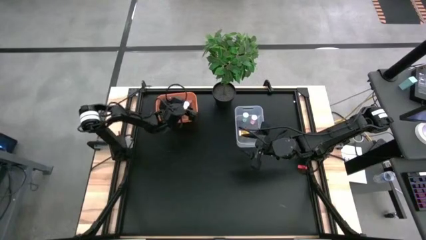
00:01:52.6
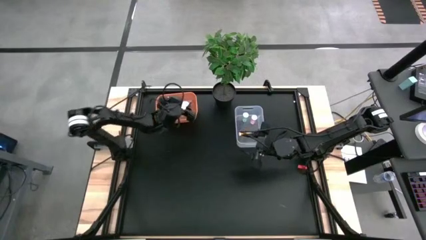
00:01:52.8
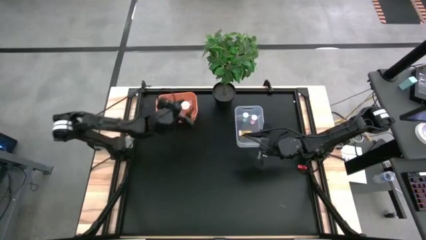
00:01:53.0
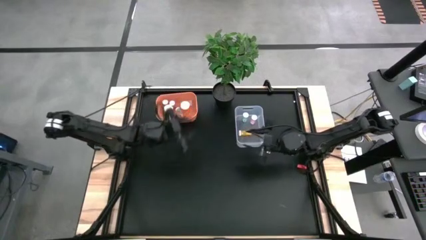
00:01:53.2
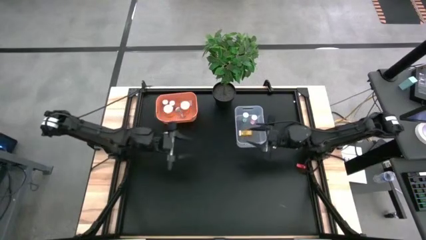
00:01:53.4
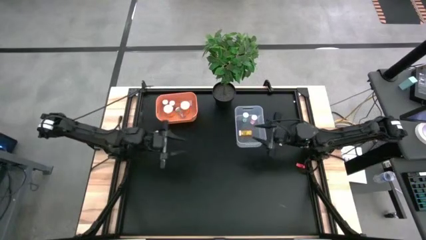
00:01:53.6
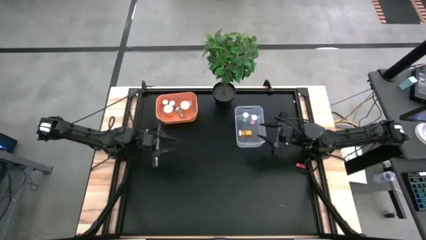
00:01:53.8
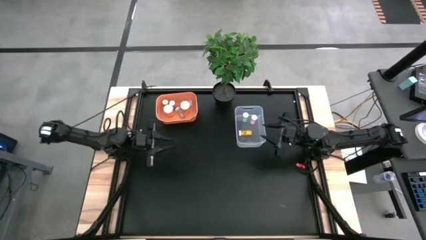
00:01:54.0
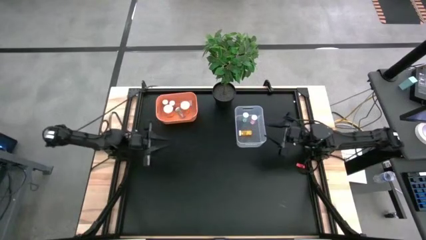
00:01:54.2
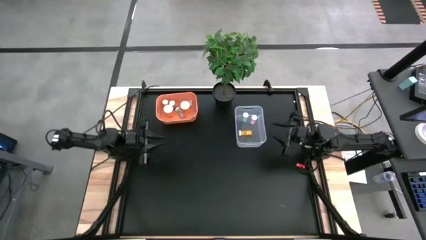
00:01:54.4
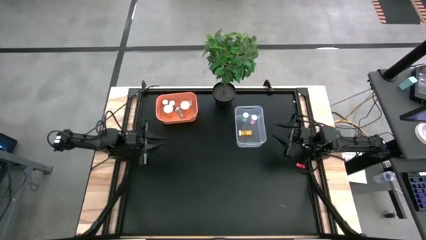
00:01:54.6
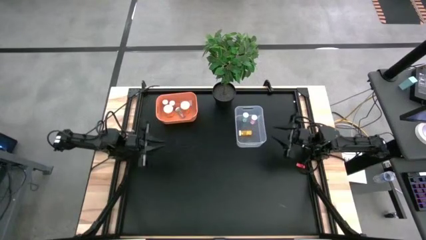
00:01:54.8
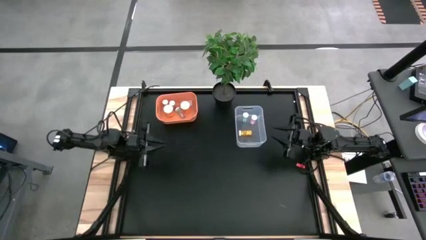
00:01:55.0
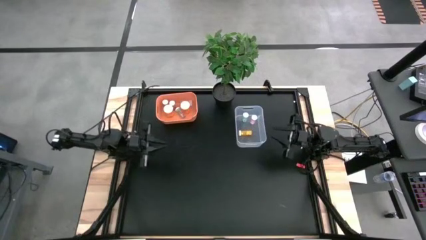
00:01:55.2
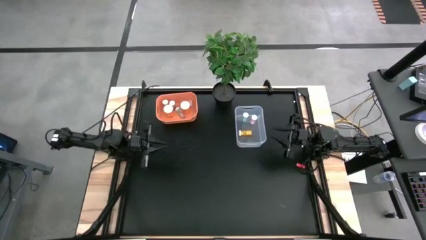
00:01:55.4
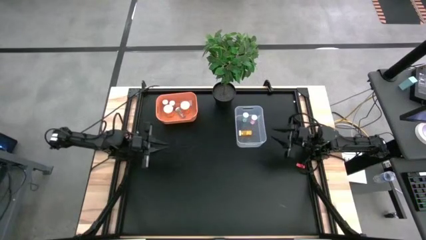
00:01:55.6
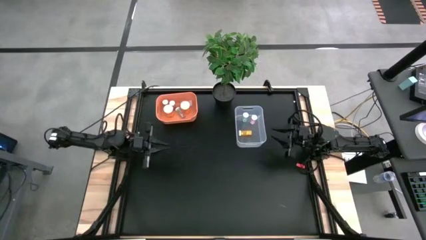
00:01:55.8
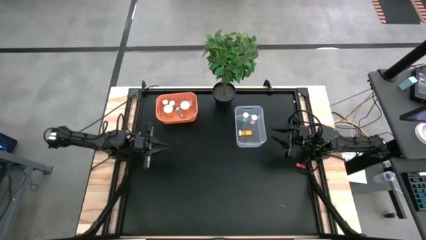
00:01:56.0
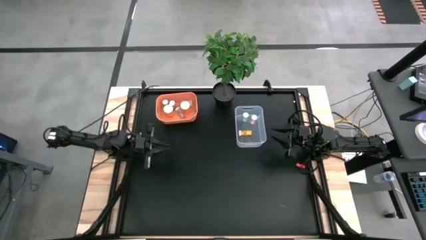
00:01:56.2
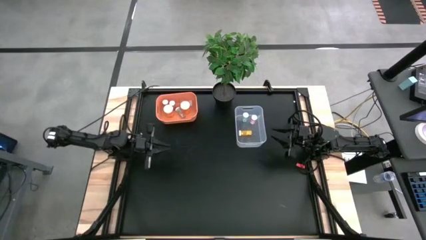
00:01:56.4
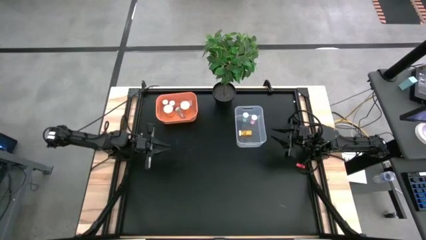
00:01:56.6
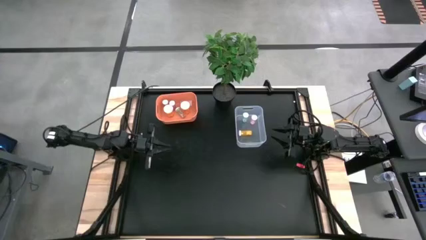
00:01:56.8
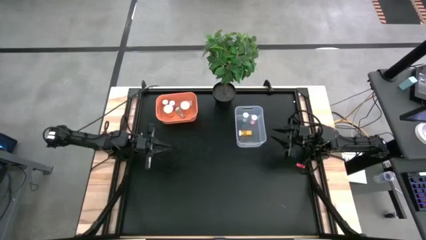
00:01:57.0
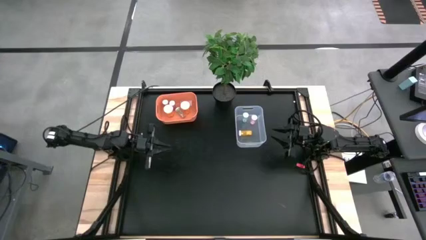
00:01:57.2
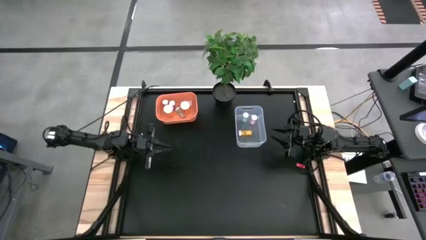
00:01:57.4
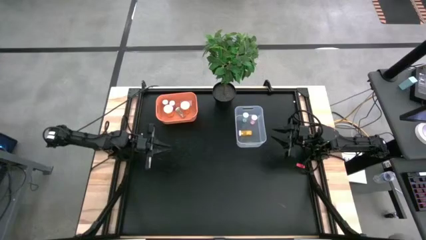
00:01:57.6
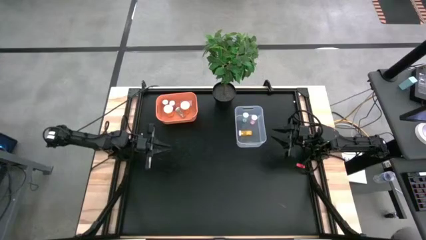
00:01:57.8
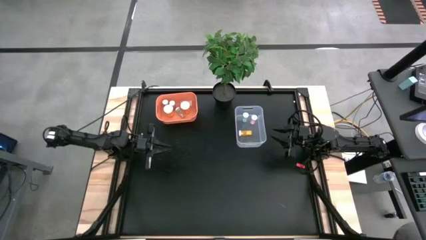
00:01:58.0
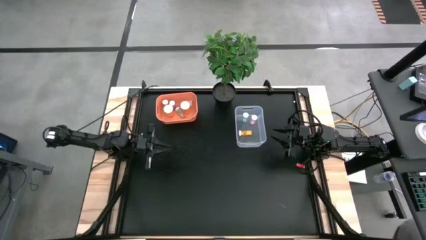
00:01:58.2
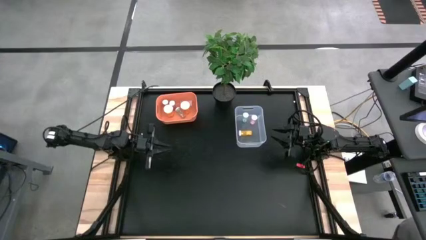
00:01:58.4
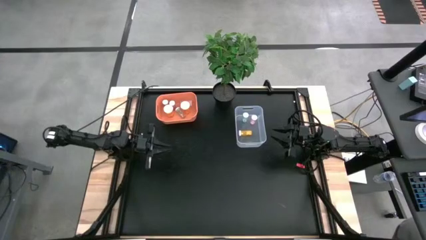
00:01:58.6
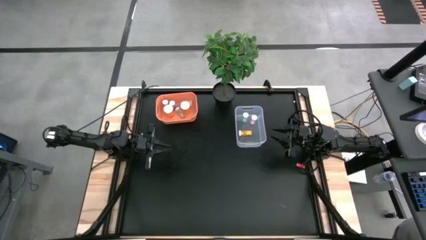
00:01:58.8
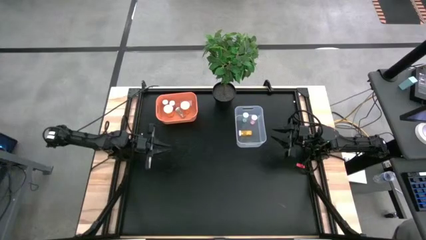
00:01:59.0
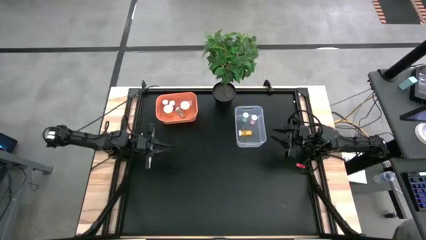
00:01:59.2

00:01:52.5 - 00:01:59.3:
Task: Pick and place medicine bottles into bin by pill shape (circle, oval)
Return to Home Position

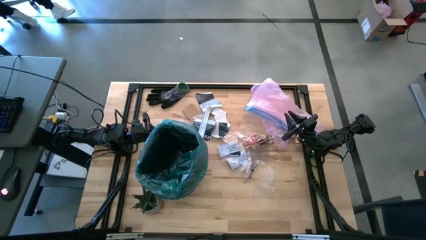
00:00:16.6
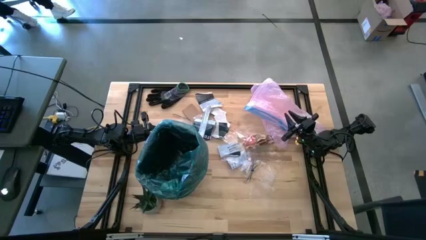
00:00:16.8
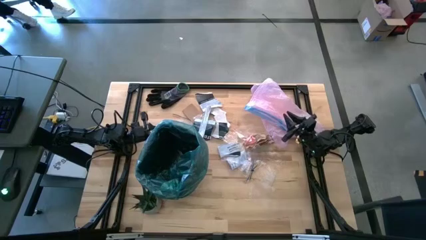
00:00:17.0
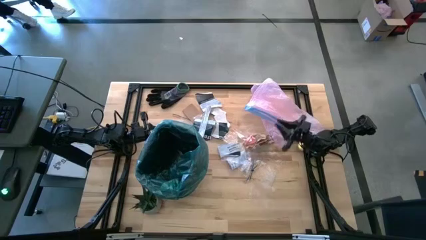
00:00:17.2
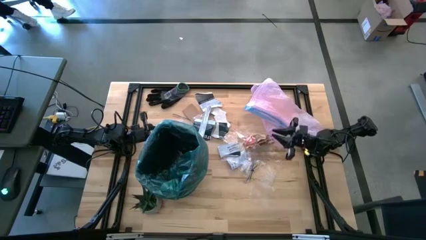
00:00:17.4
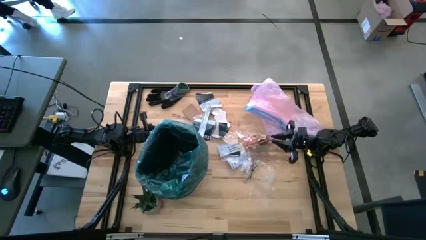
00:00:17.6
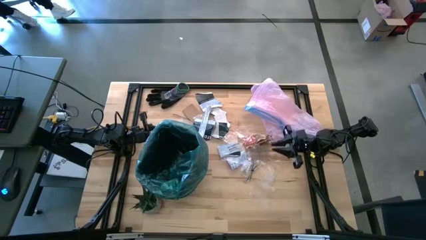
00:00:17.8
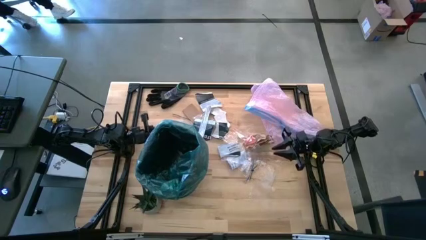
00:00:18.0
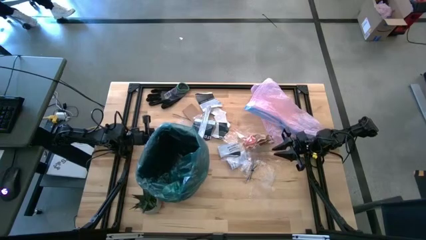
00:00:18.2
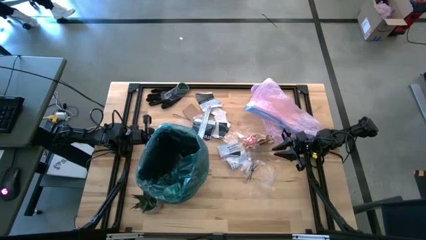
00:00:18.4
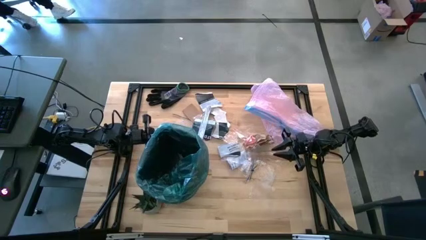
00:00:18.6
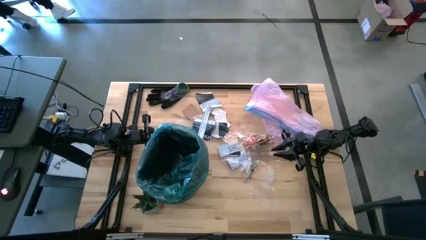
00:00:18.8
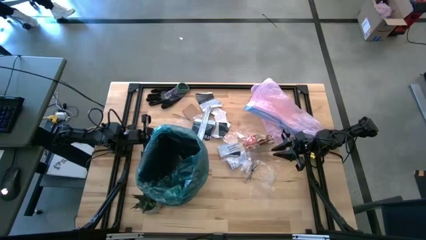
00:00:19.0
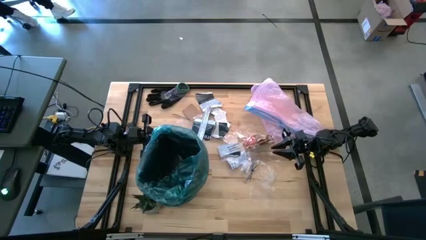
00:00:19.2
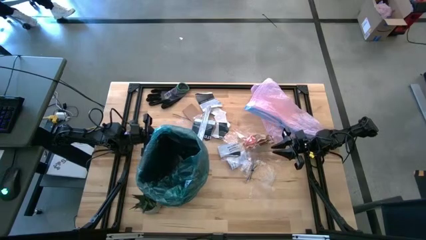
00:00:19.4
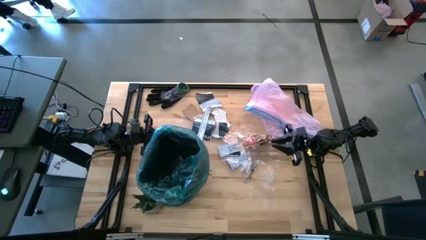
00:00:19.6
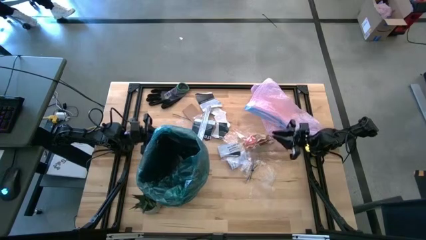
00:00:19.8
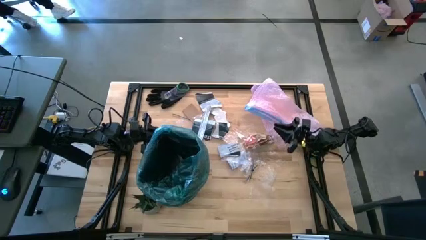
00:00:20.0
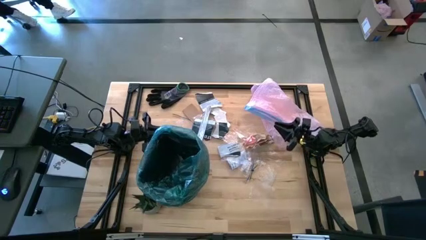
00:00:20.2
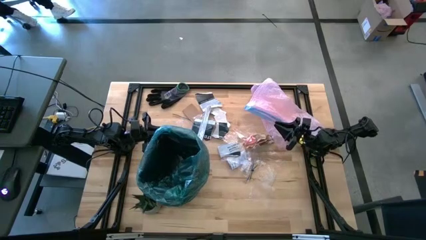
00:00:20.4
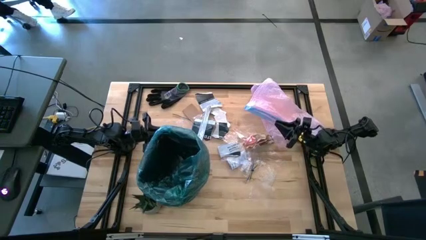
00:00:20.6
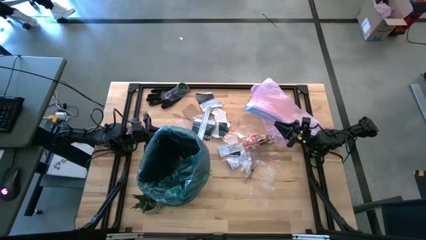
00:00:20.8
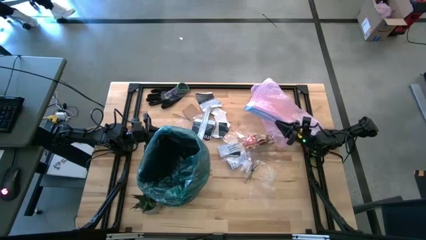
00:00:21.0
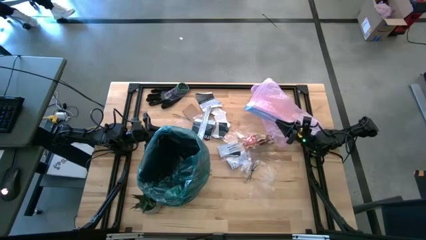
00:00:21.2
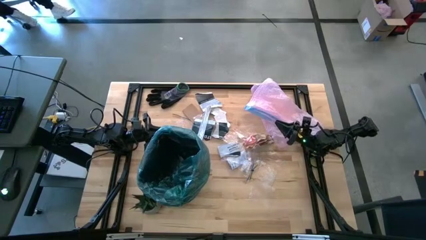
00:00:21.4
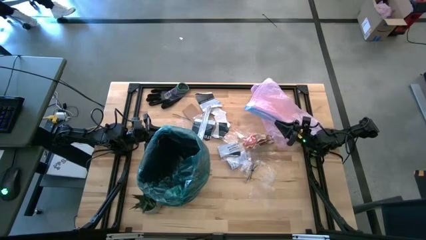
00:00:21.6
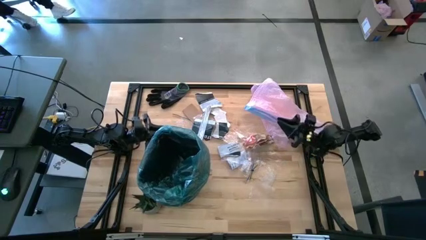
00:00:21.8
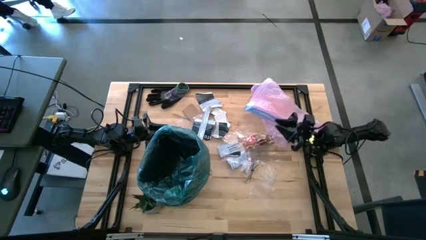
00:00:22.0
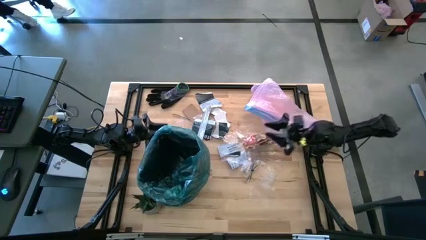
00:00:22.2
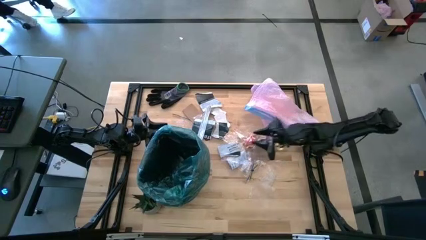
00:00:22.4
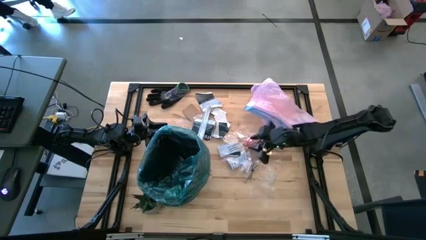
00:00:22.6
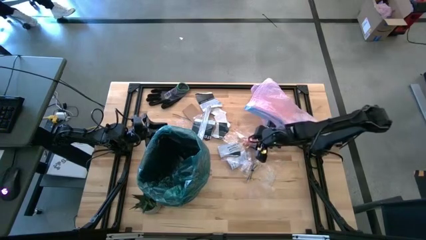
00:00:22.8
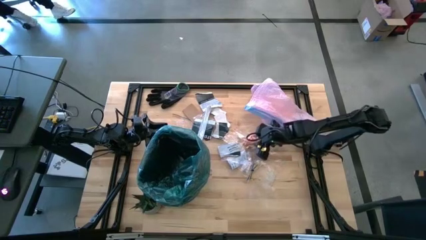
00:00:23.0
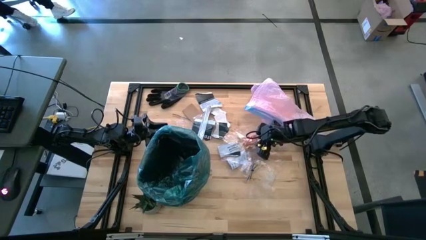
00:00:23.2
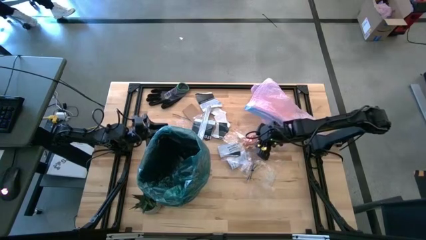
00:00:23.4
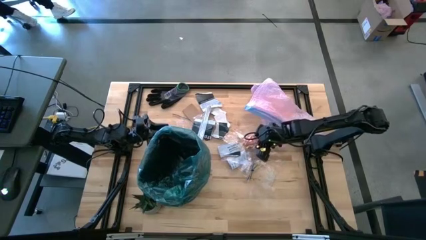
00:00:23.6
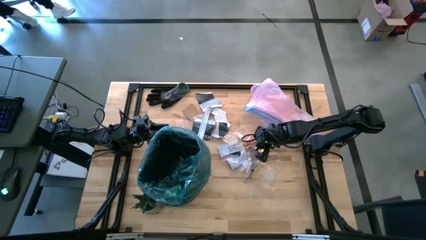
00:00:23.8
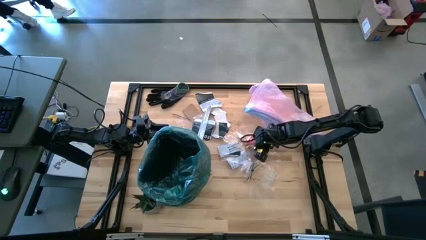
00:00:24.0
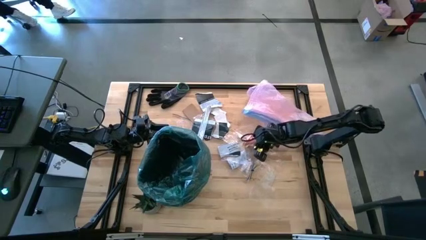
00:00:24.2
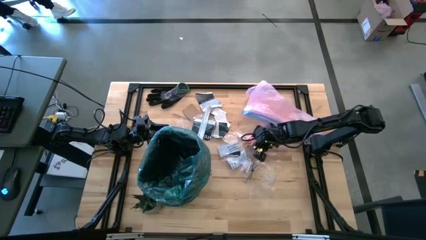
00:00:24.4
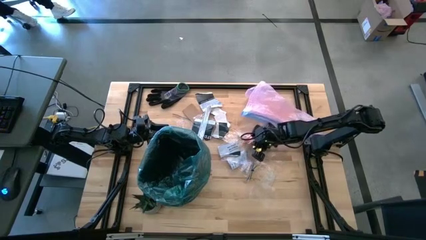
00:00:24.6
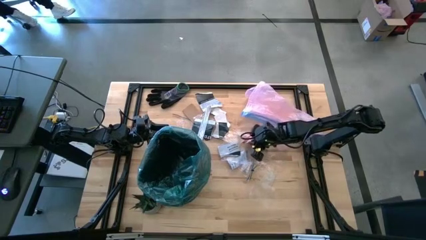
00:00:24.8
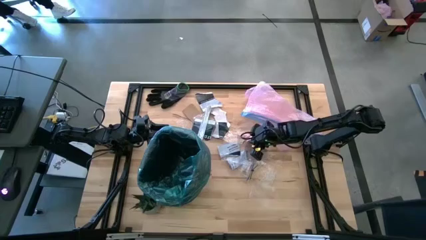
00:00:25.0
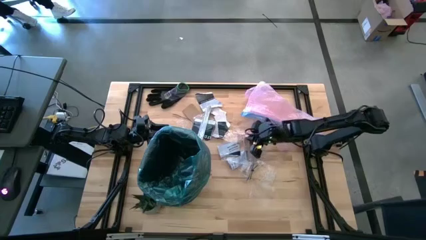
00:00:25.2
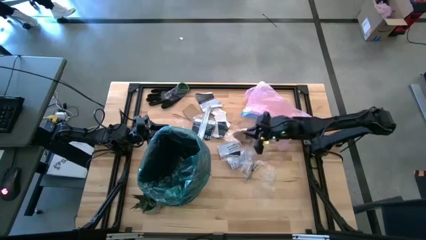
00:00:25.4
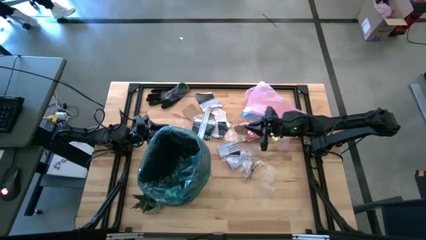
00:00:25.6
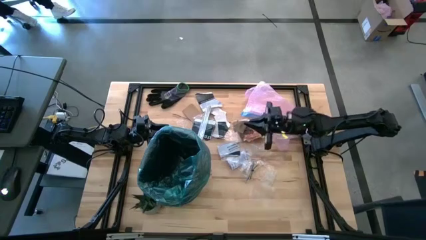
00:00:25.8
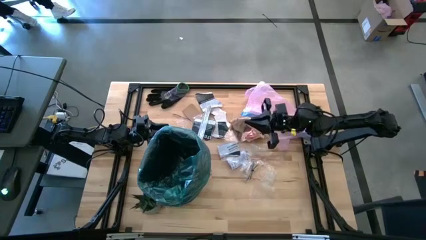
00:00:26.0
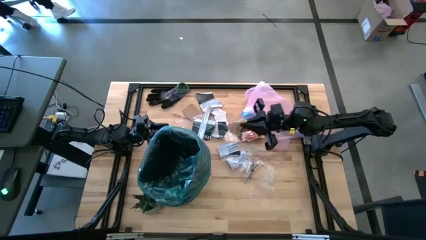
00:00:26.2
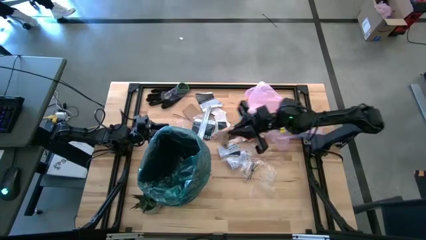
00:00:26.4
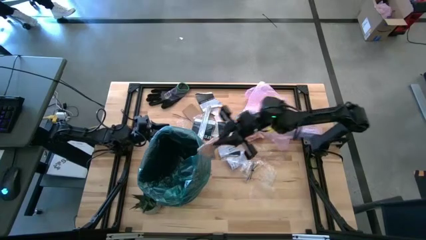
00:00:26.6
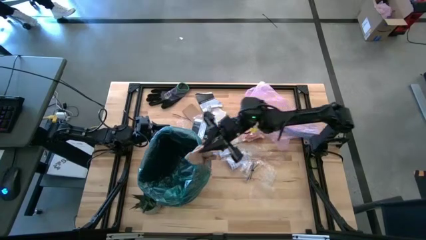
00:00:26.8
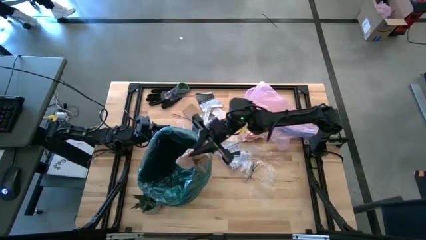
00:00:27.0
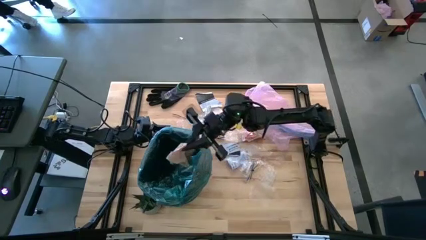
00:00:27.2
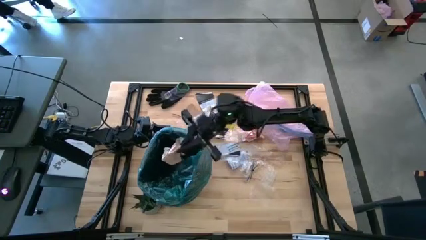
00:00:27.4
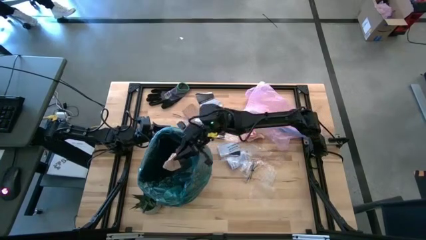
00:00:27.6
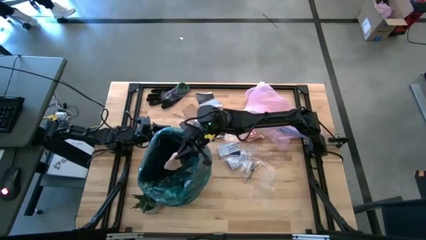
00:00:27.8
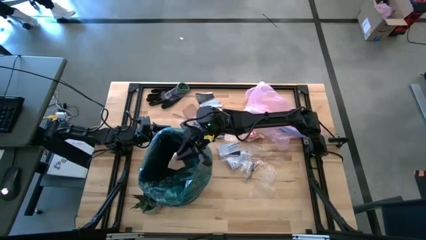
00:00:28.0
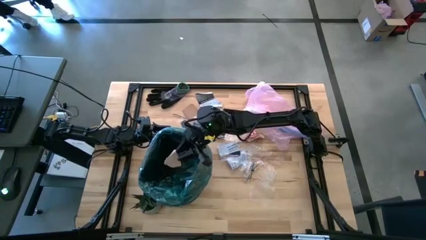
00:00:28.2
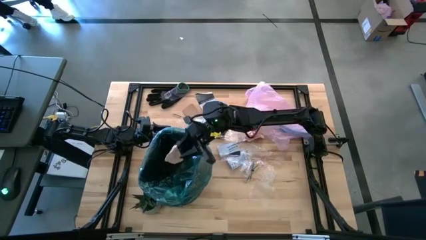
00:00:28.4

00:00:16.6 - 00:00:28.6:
Task: place trash/remove bag and relplace
Put the brown paper into the trash bin
